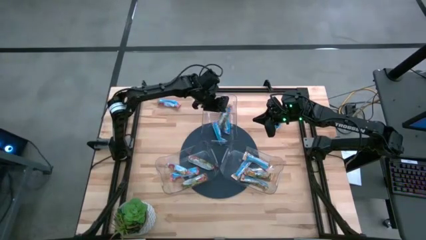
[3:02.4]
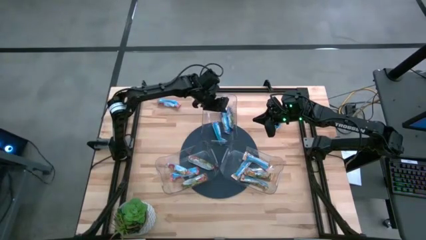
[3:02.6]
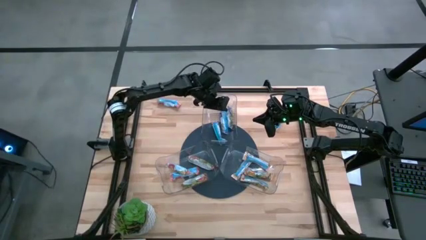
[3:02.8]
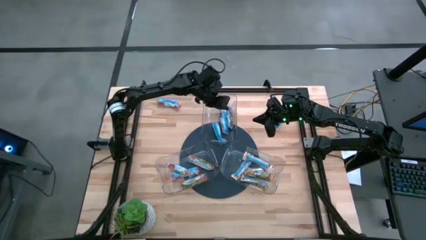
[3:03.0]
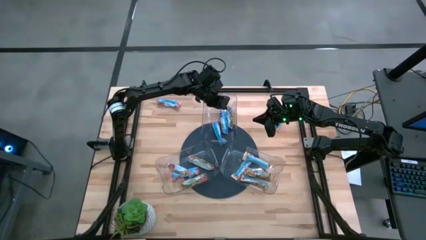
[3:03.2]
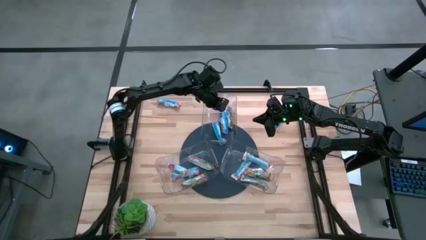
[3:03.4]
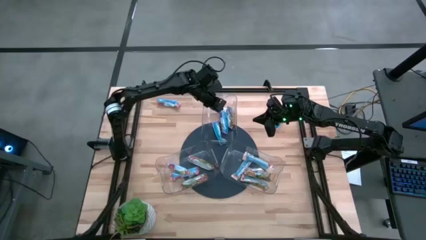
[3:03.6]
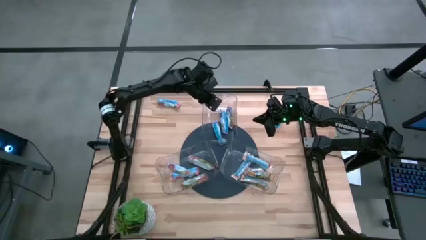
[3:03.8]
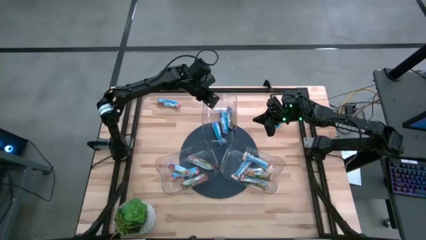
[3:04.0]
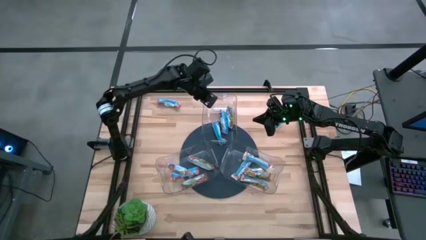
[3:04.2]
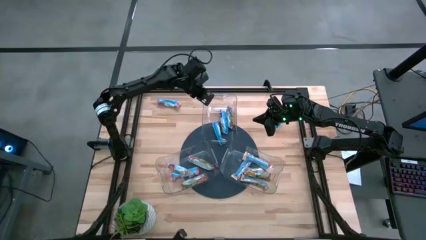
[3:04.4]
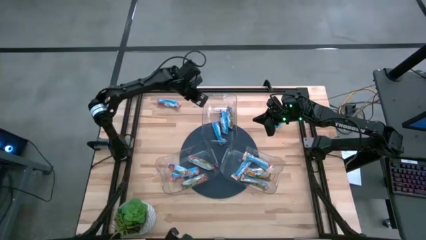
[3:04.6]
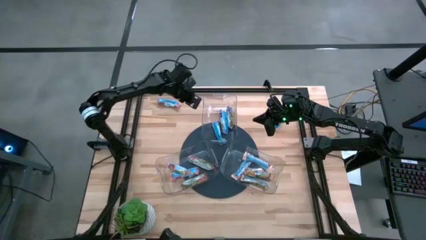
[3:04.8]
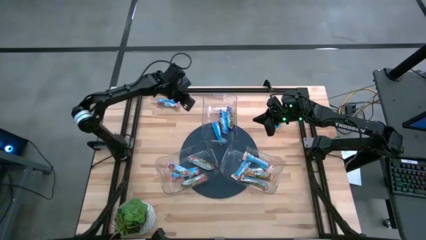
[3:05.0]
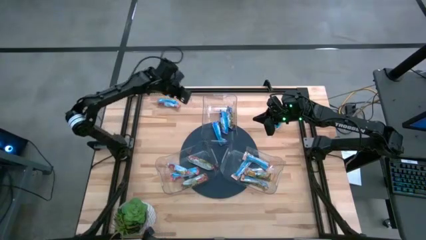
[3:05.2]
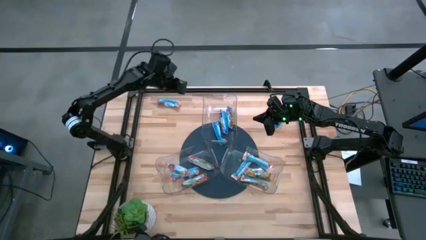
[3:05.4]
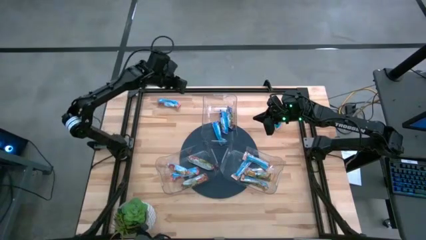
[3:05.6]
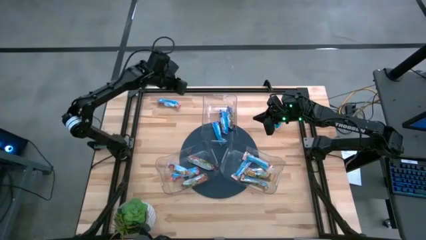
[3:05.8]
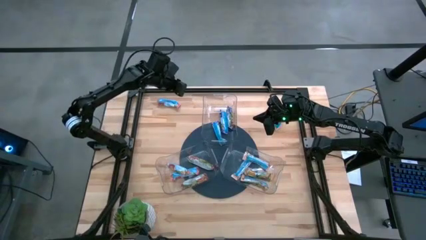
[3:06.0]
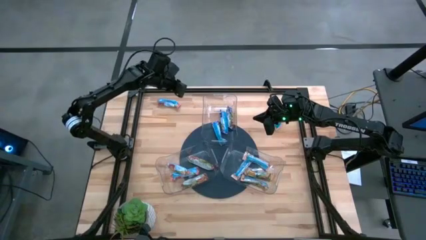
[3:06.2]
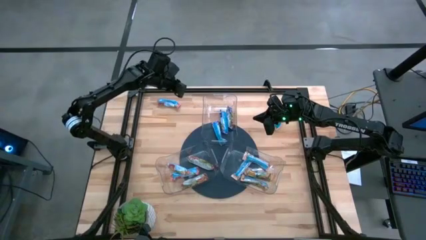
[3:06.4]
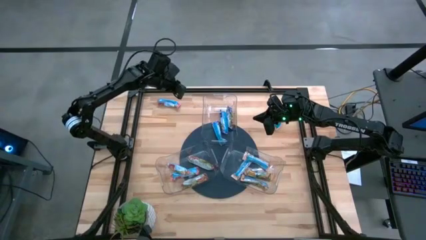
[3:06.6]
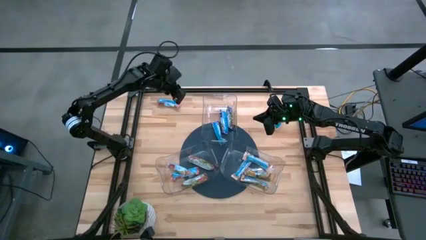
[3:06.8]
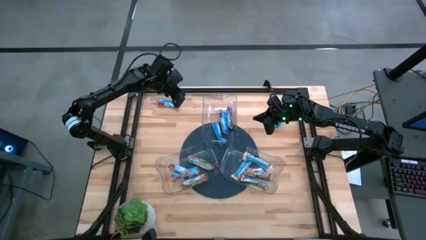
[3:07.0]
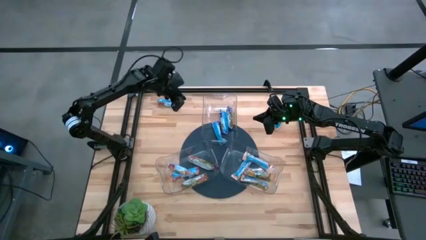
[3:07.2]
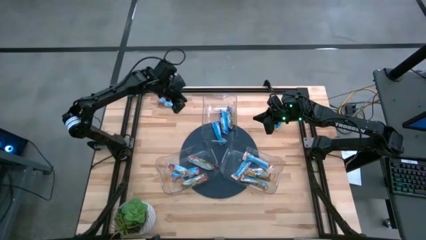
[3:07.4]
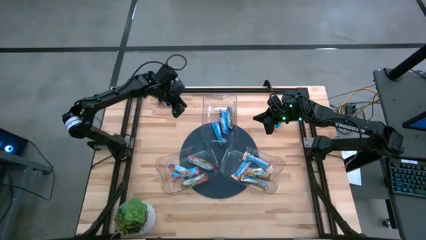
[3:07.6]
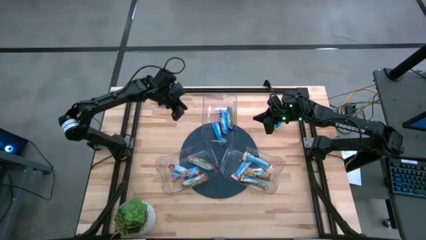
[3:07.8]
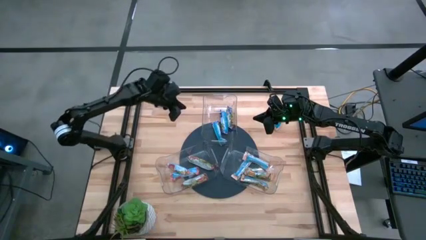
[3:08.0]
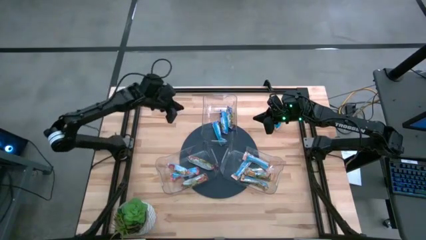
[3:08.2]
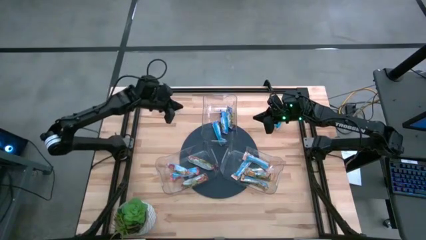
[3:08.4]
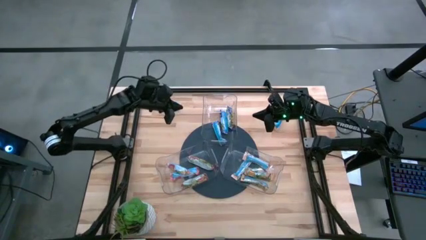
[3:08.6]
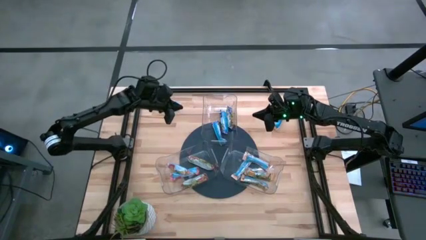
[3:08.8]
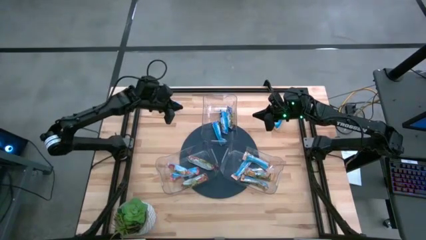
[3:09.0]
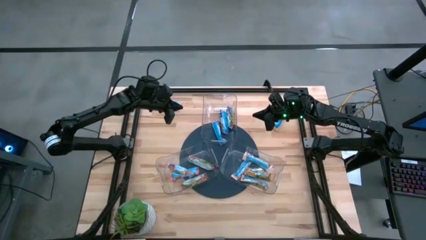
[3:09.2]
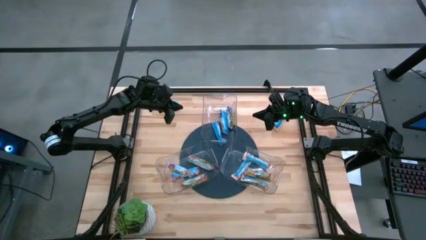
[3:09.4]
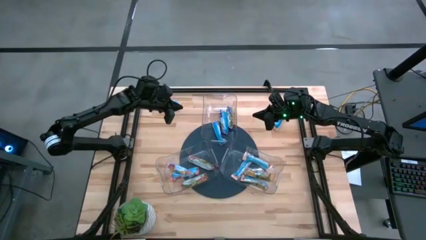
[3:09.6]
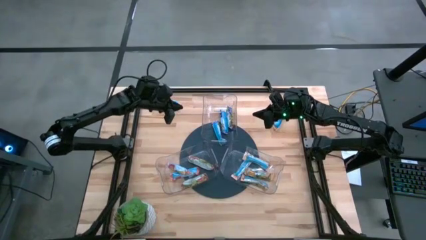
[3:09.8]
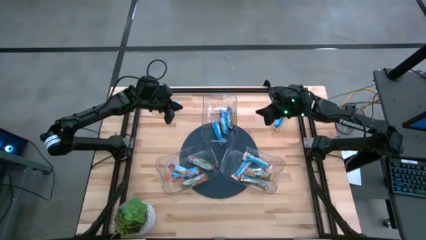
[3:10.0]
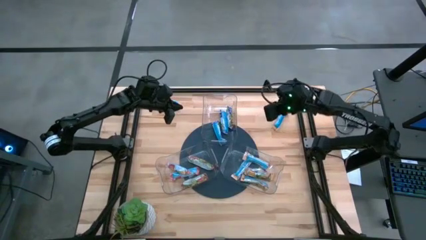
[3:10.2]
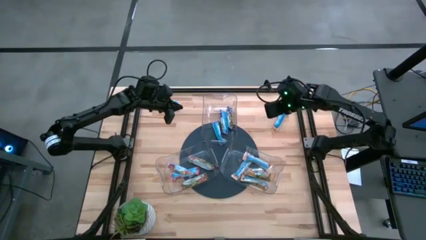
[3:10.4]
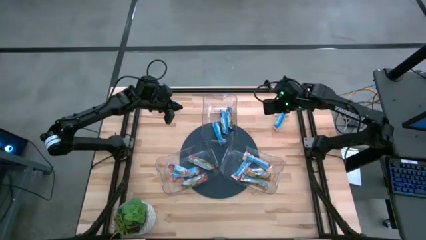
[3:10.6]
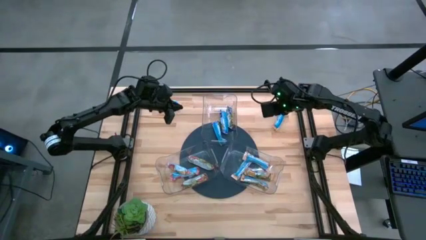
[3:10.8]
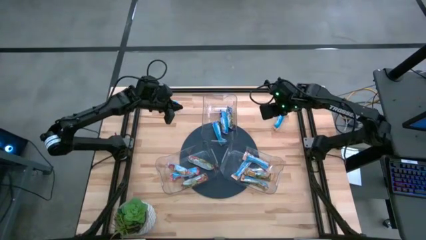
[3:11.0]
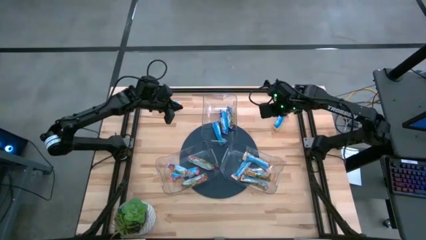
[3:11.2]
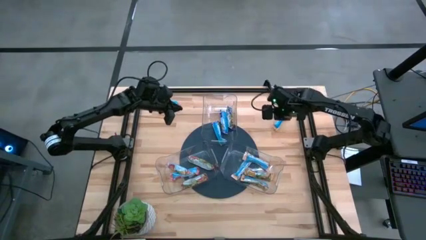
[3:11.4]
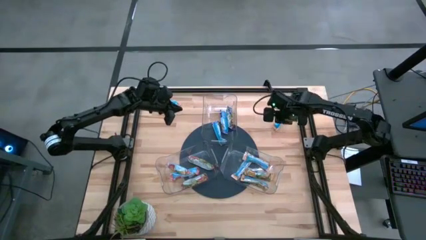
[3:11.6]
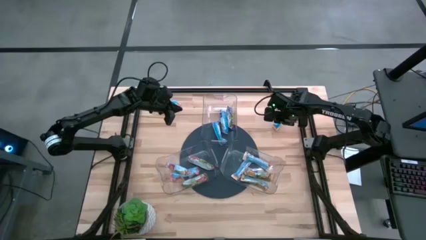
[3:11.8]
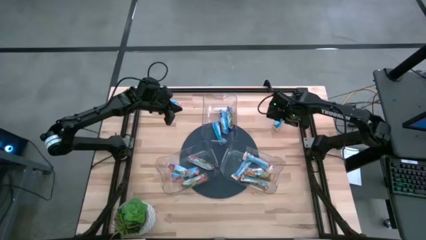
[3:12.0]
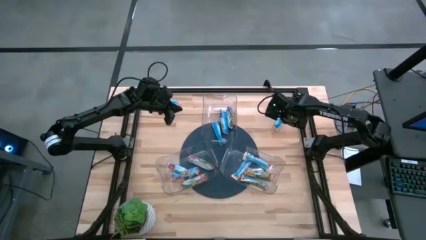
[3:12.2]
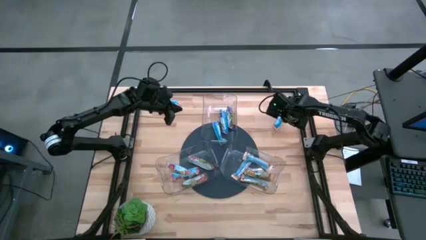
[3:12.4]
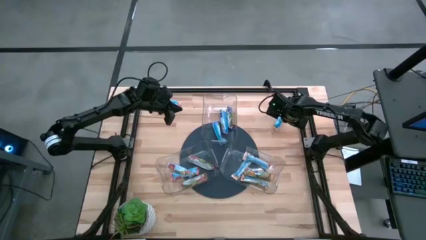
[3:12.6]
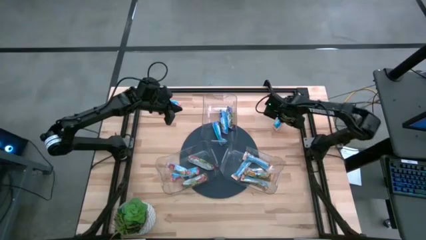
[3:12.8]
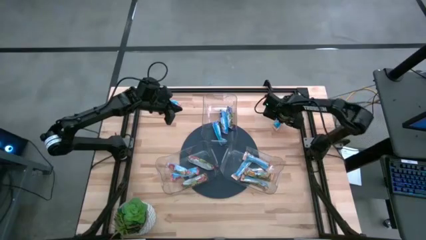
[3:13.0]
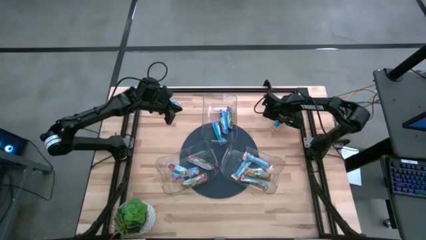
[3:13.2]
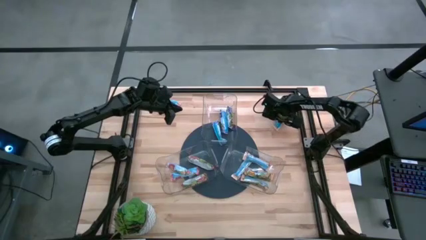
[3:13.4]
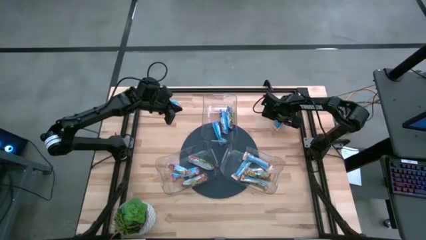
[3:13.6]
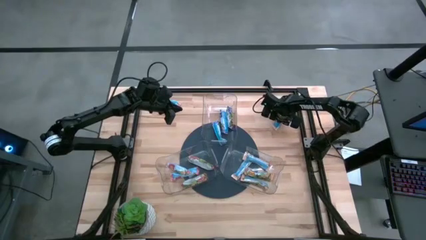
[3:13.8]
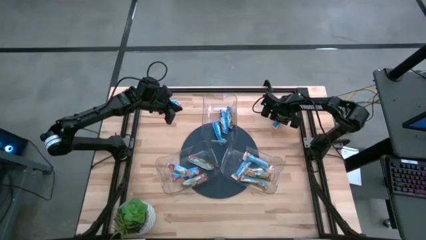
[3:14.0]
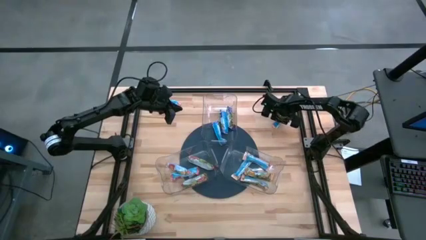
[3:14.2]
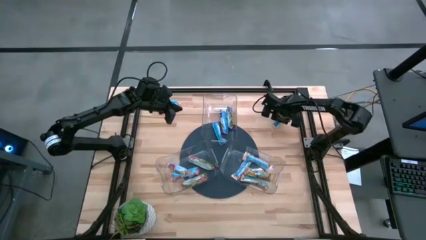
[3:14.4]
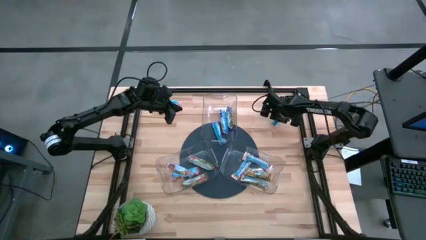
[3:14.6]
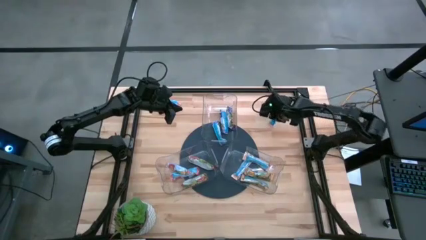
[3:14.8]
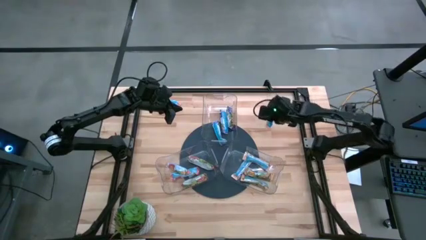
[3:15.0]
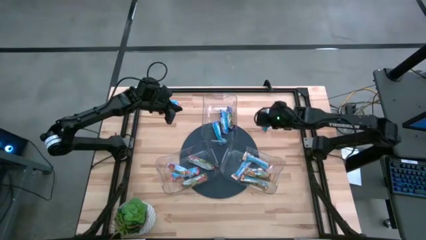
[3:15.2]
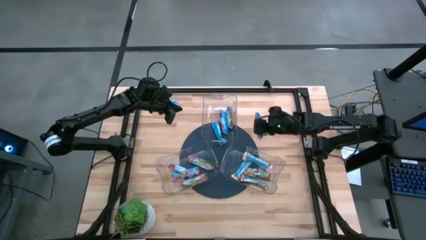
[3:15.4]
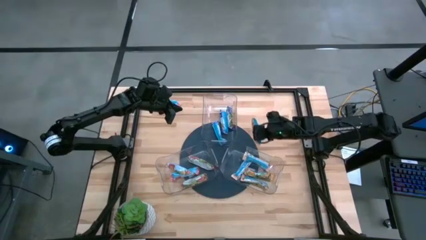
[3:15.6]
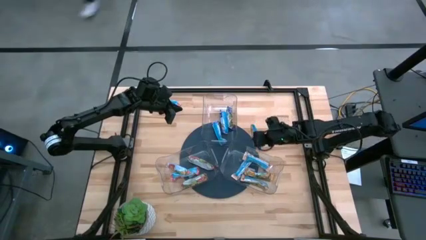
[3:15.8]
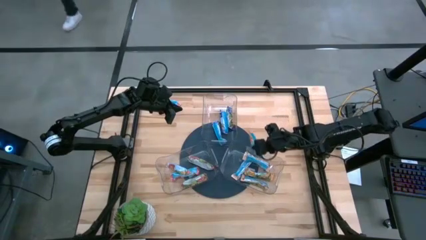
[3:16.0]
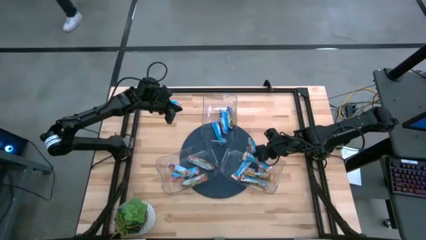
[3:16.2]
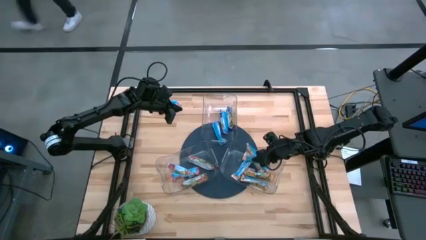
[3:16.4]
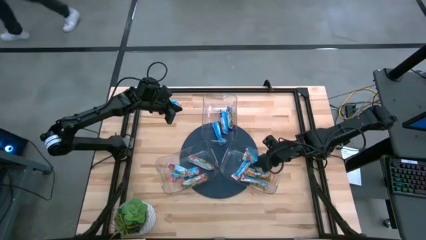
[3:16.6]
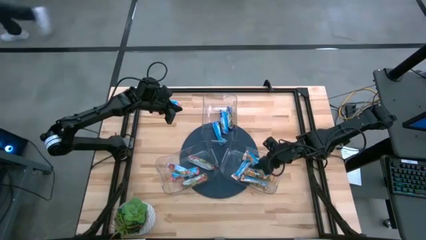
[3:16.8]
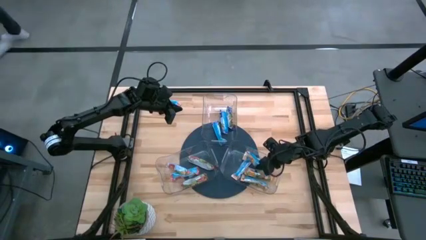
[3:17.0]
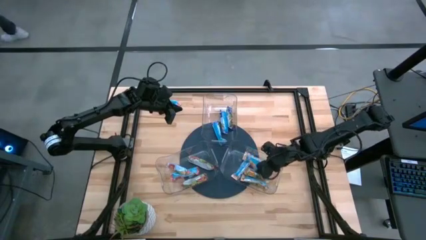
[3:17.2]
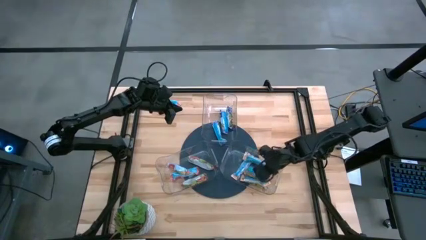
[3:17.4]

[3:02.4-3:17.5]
Task: Pick and place Granola Bars by type
Put the orange granola bar into the right transparent bin

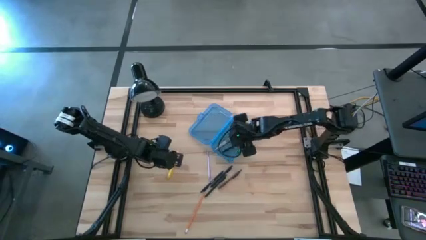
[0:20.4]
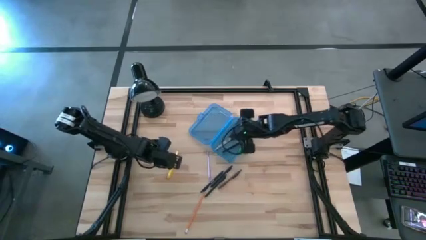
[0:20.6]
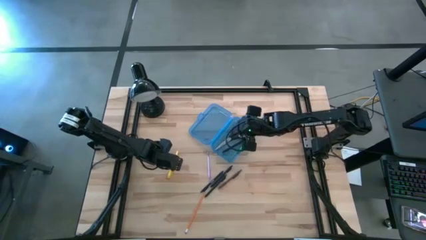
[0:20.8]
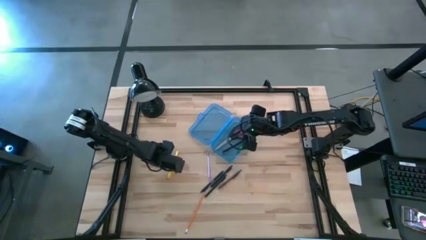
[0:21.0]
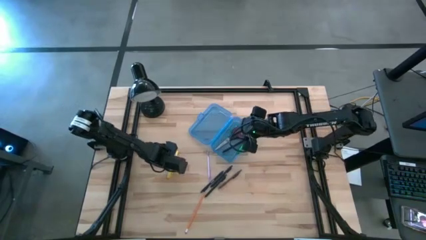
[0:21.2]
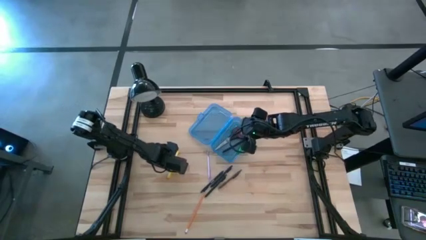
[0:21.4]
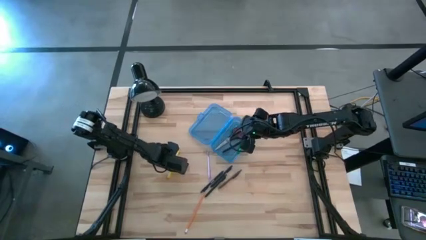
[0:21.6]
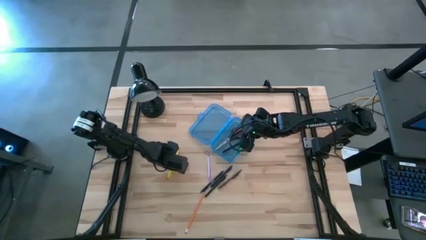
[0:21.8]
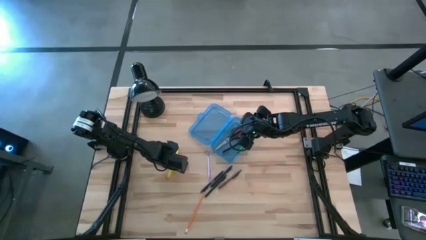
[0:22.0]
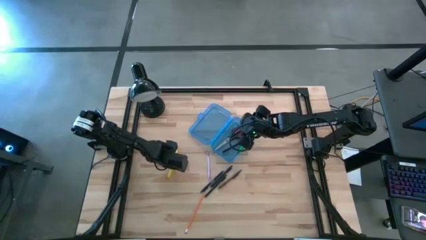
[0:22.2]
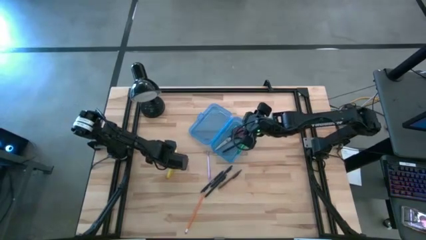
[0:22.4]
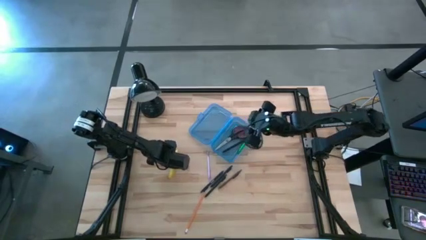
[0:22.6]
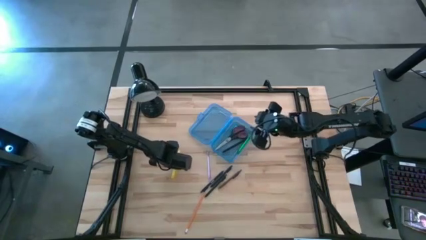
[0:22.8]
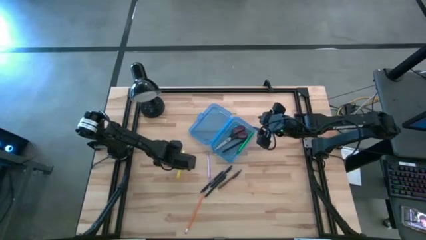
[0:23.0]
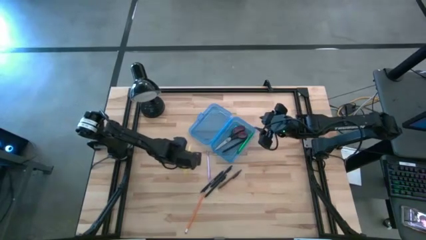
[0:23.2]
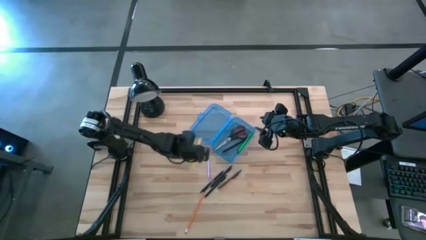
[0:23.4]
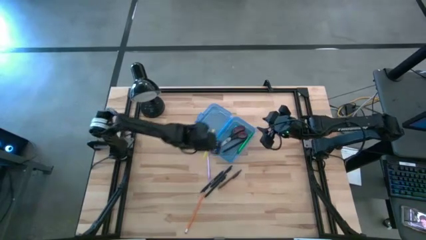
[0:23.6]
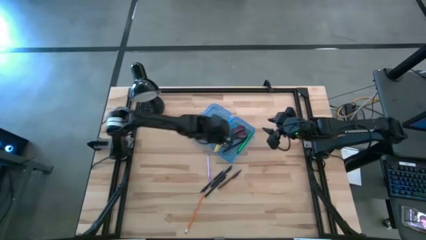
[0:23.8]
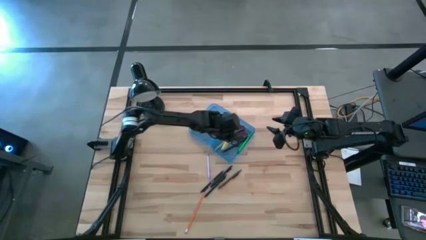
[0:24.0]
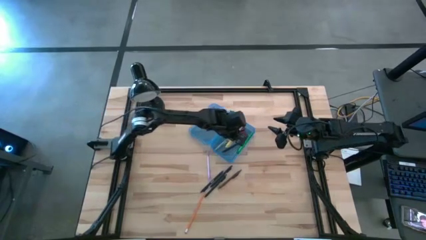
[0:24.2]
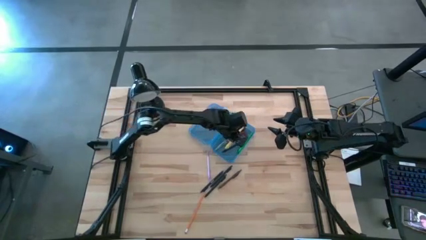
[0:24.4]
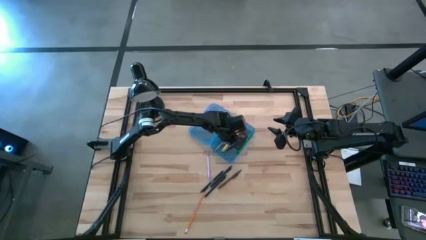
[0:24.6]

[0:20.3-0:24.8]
Task: Pick & place school supplies into a supply box
Put the yellow pen in the supply box
